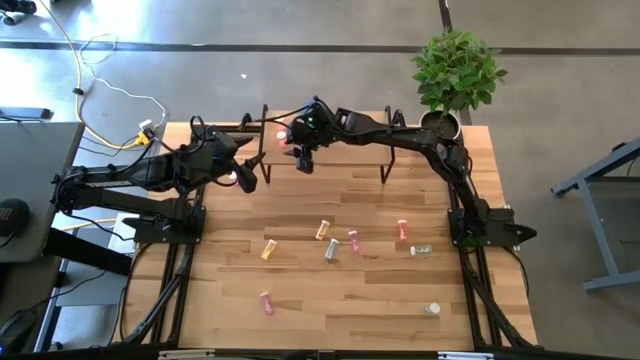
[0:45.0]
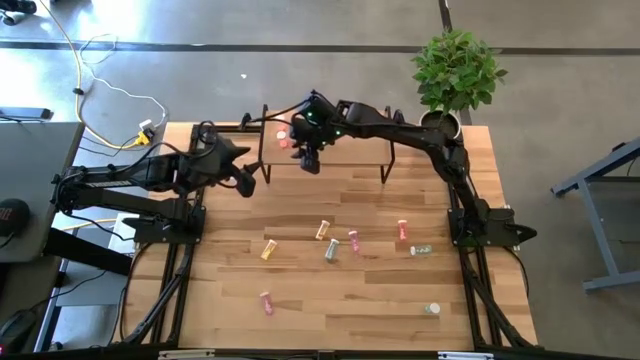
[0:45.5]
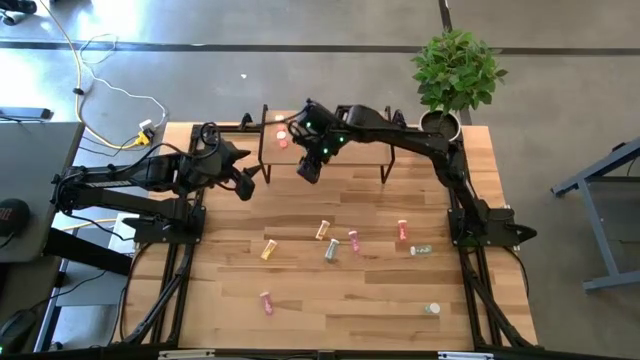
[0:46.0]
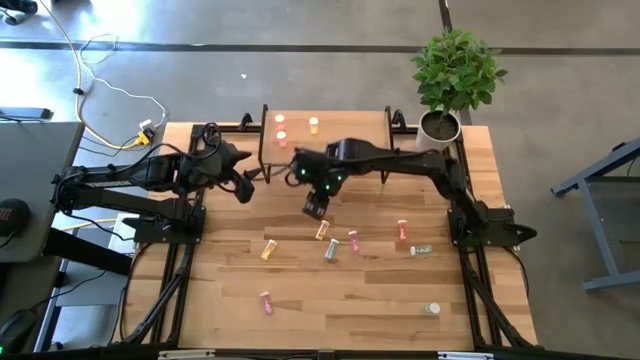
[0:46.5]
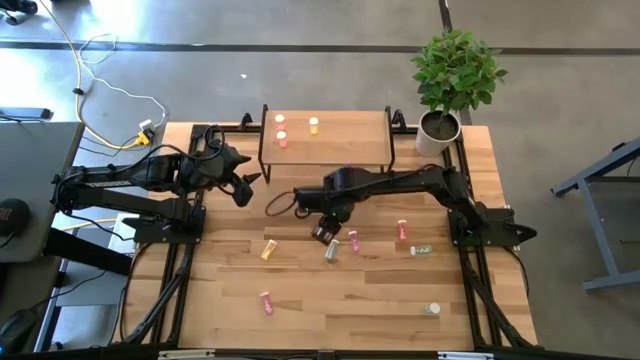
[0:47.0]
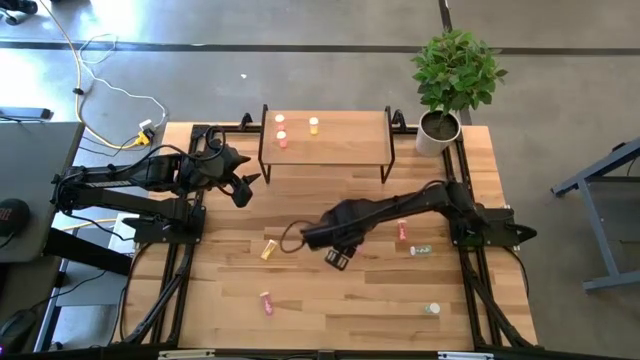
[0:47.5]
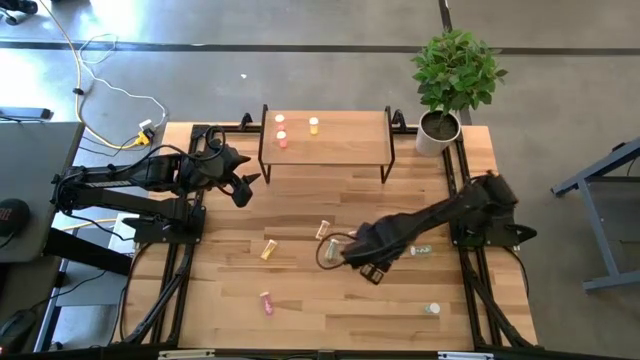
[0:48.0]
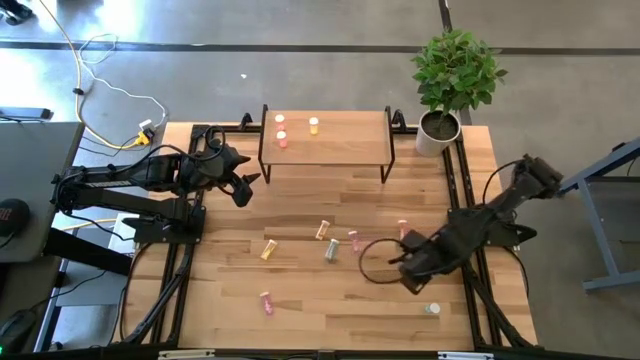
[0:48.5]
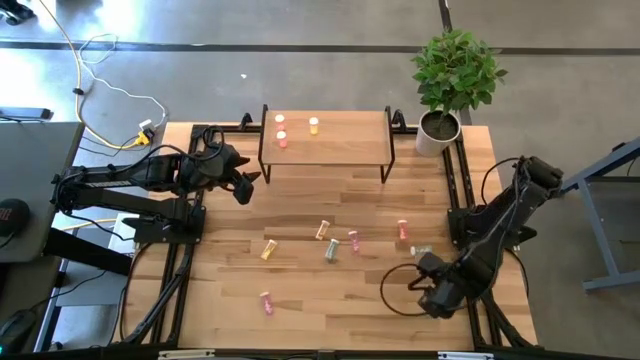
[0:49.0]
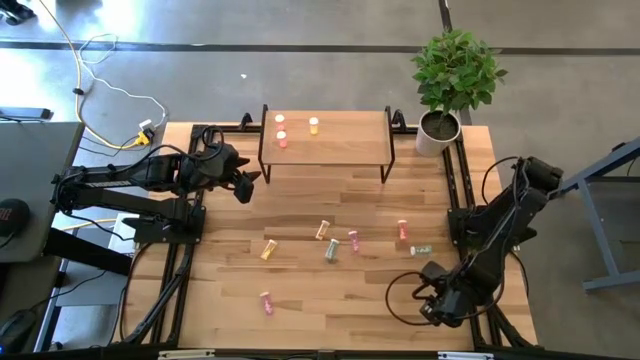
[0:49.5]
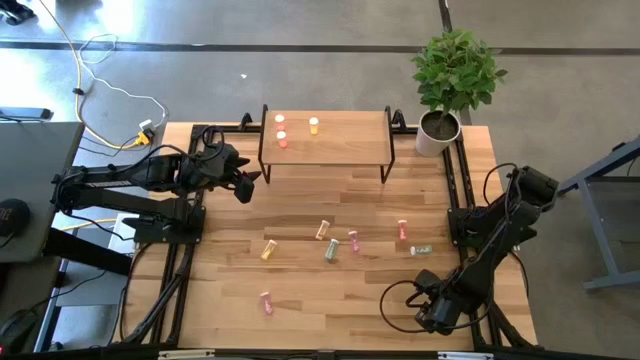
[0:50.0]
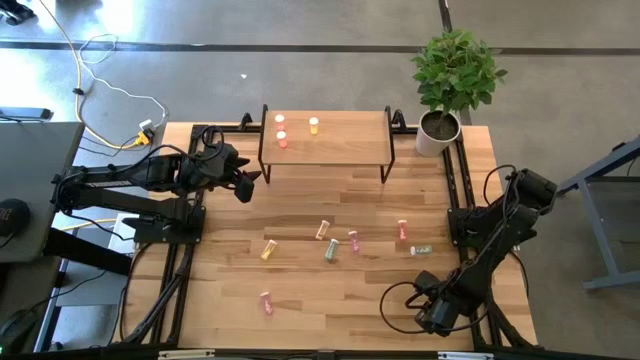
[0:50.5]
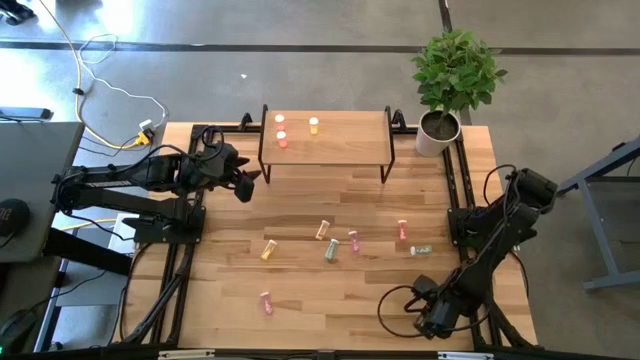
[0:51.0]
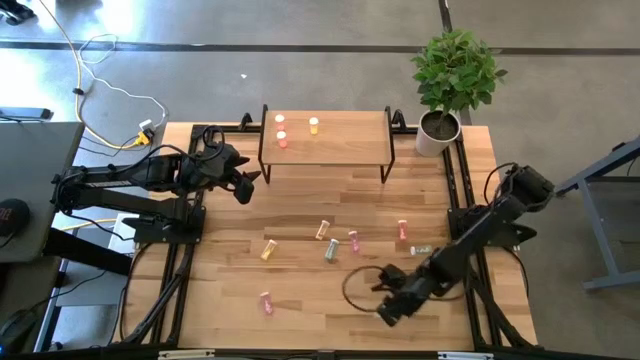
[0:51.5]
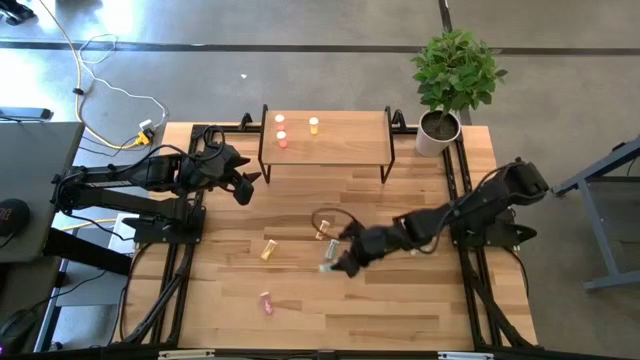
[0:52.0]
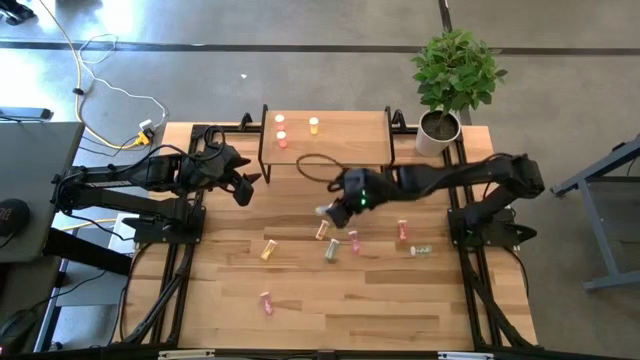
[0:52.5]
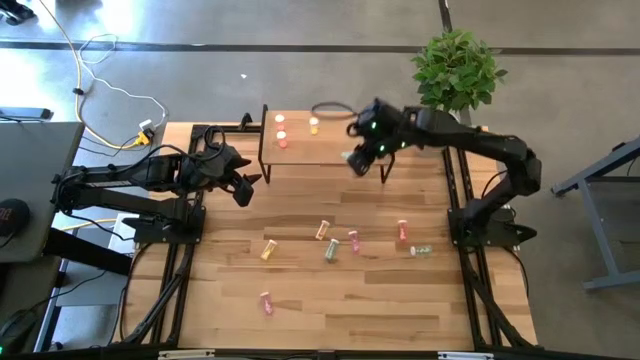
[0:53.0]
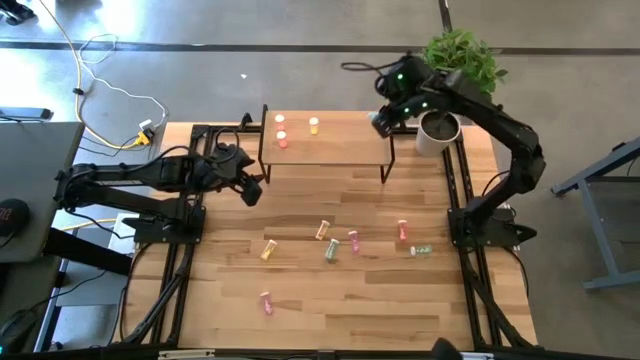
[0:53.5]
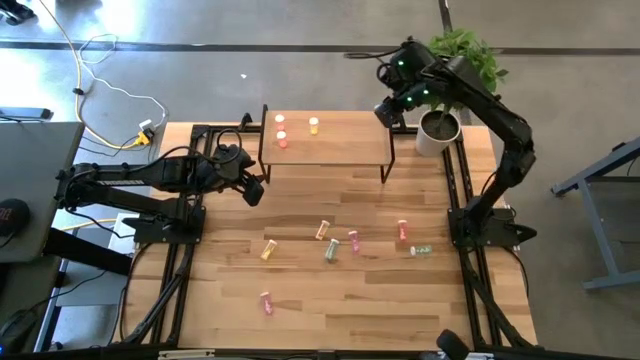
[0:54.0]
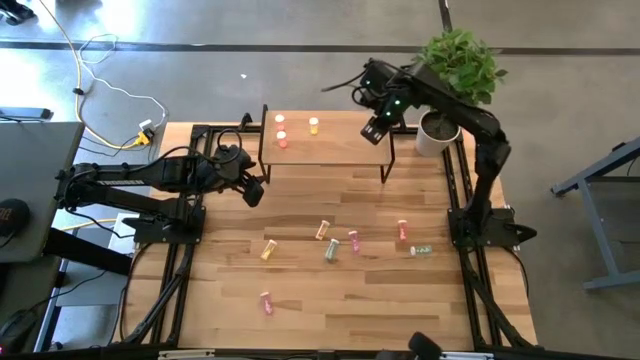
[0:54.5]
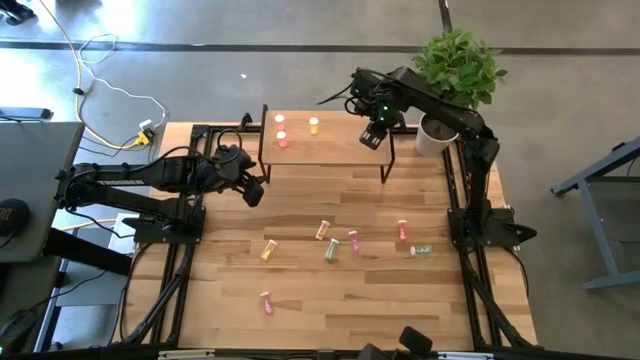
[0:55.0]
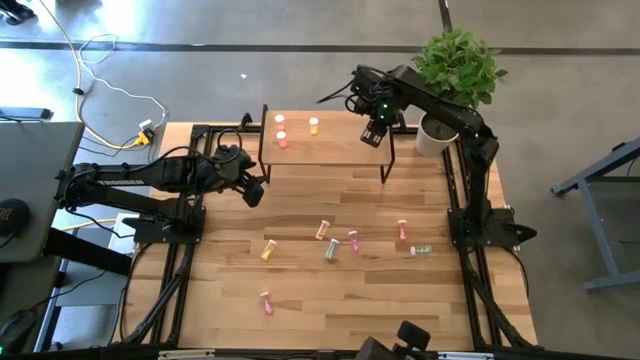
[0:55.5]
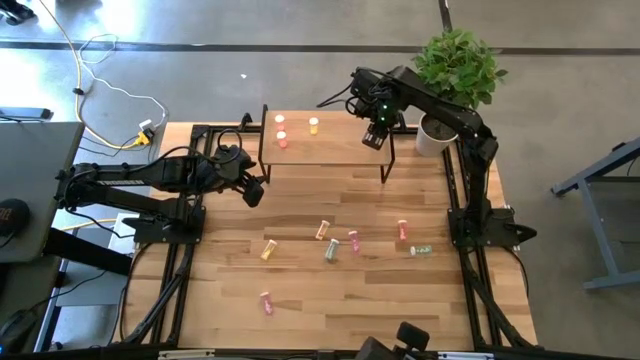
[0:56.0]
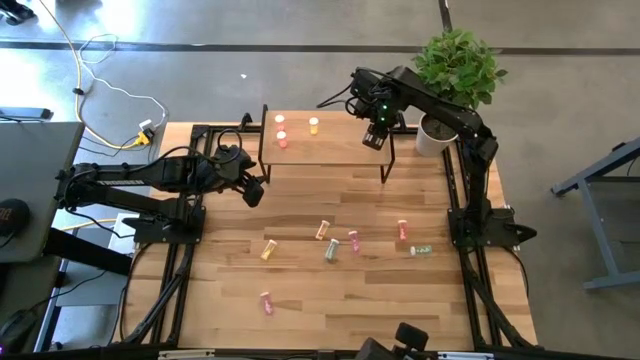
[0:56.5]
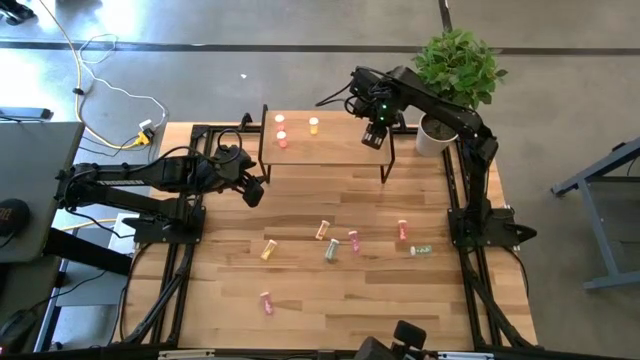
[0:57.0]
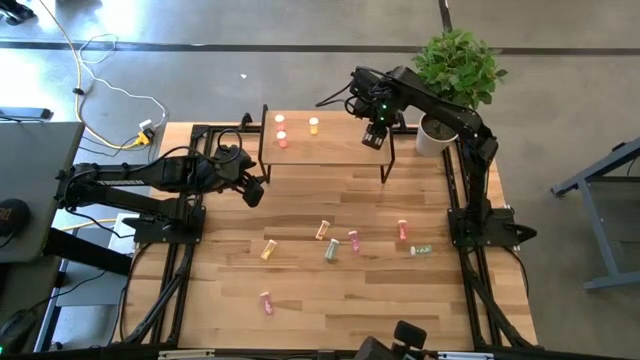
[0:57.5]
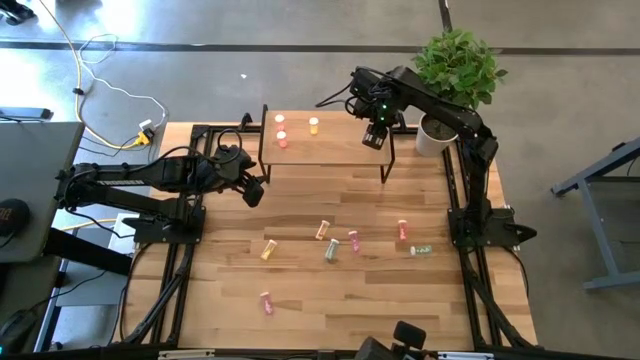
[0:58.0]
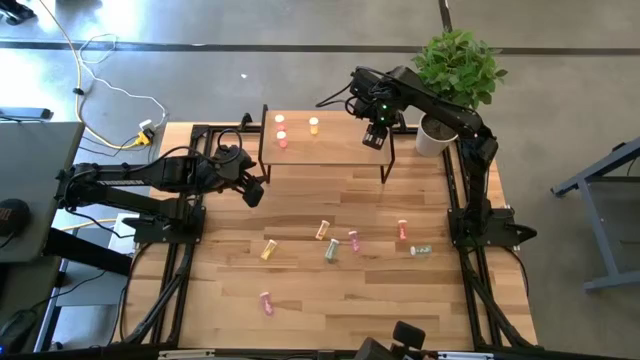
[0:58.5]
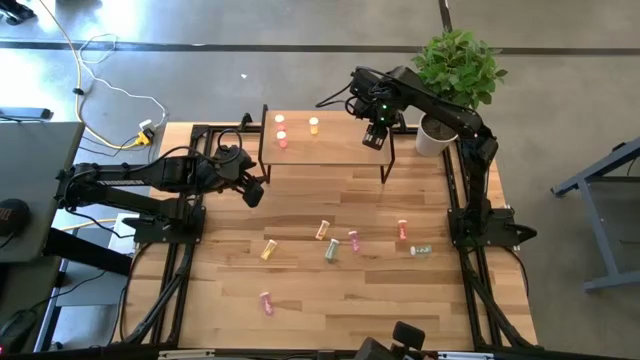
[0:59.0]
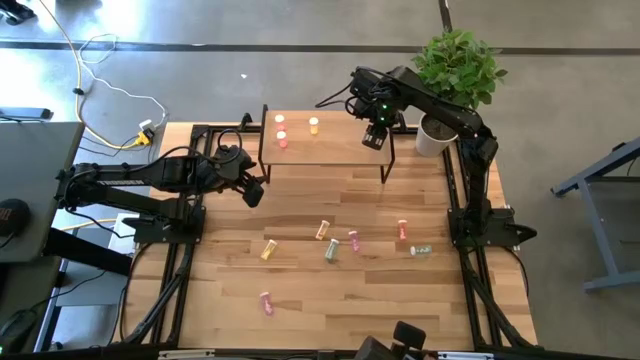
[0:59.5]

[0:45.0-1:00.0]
Task: Pick and place medicine bottles onto shelf by color
Put the bottom blue pill bottle on the shelf

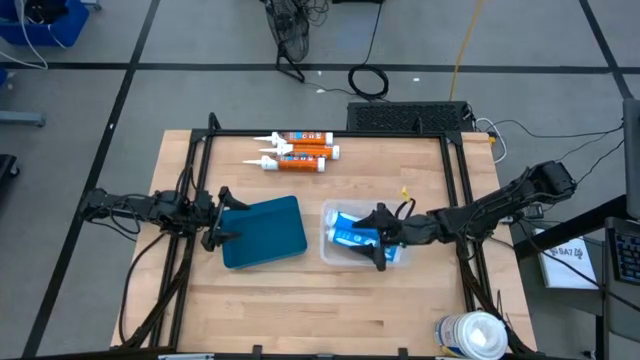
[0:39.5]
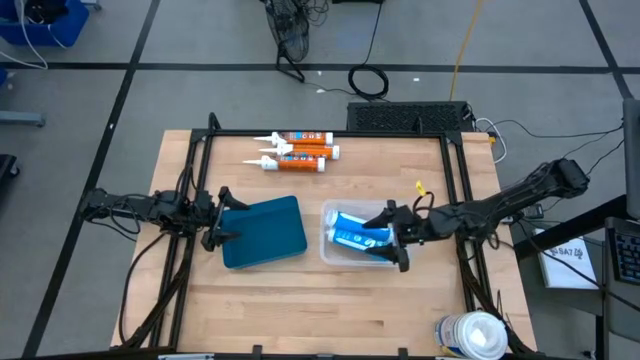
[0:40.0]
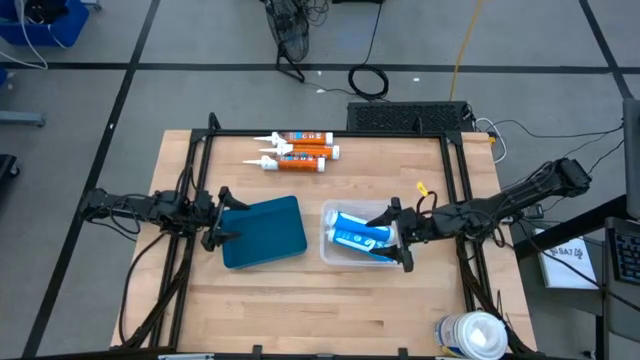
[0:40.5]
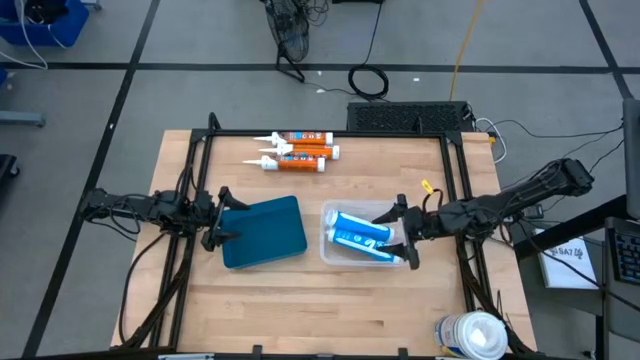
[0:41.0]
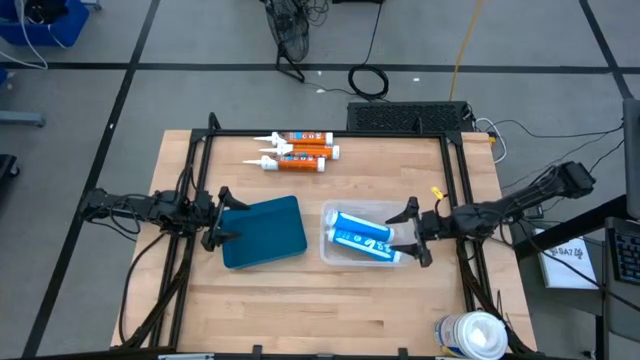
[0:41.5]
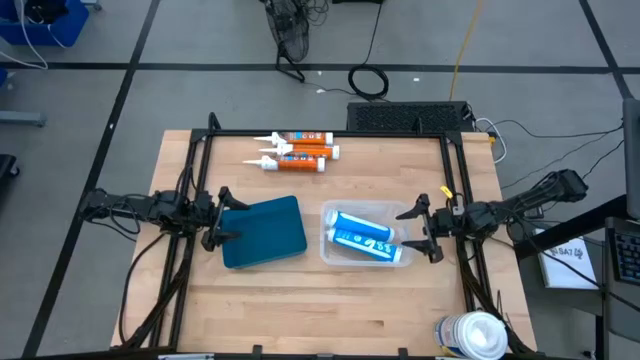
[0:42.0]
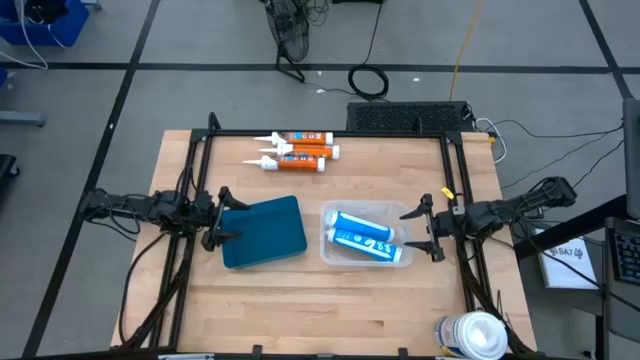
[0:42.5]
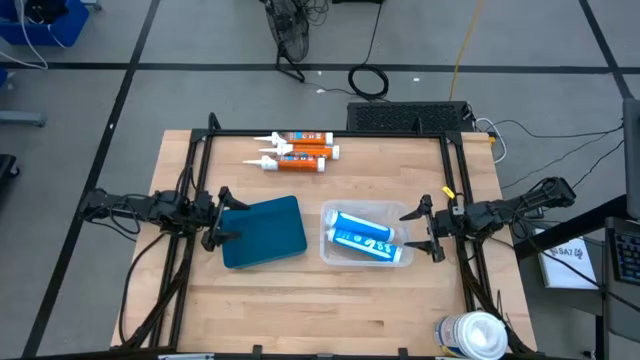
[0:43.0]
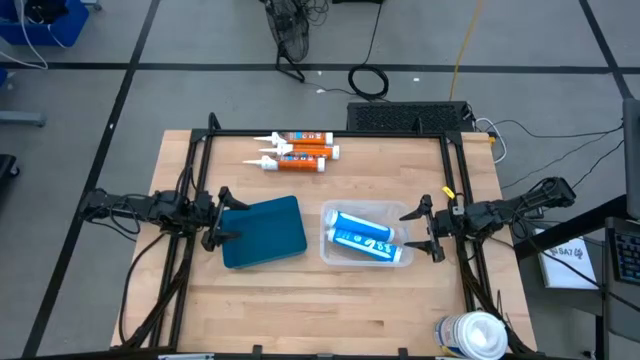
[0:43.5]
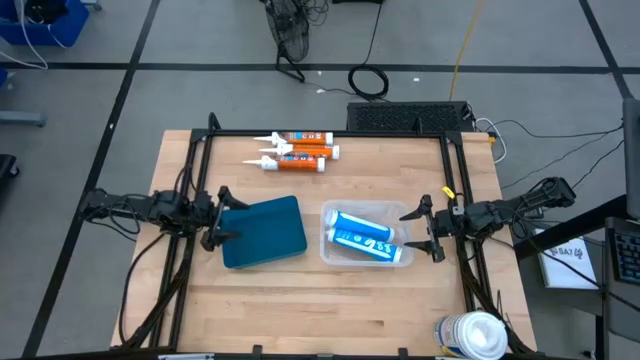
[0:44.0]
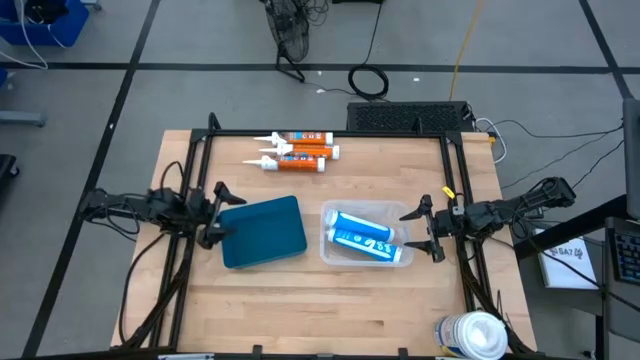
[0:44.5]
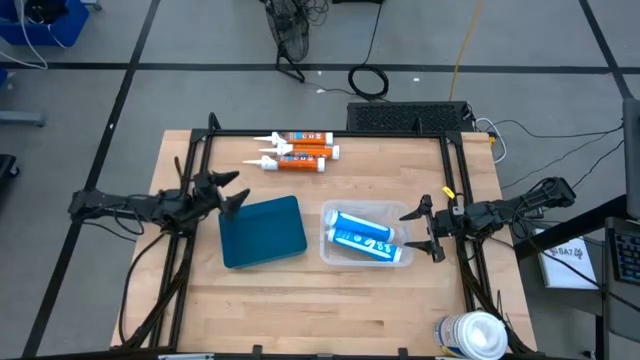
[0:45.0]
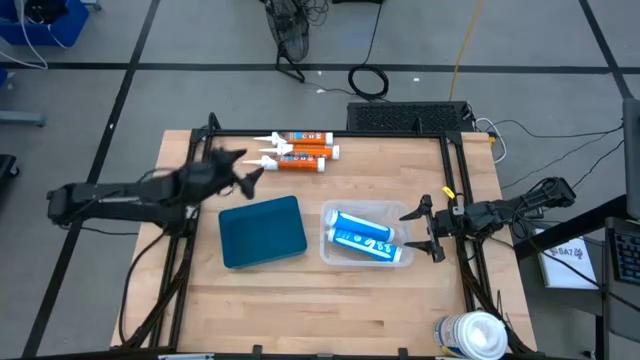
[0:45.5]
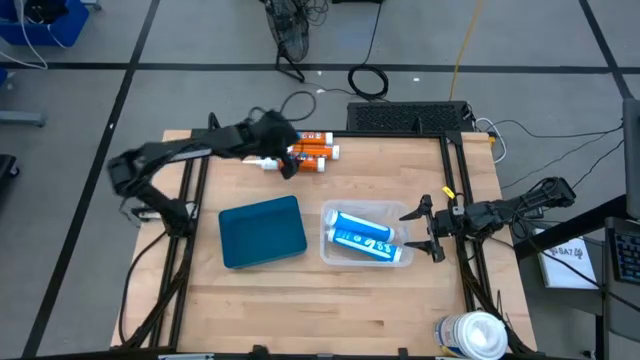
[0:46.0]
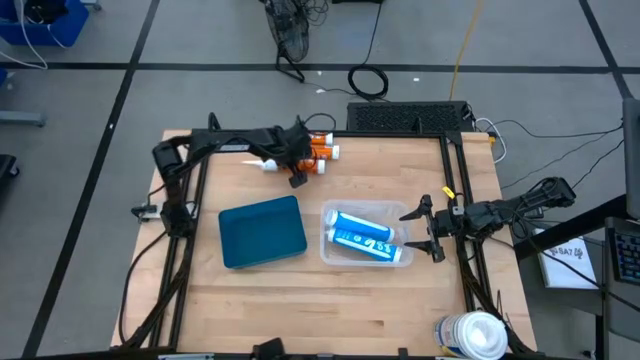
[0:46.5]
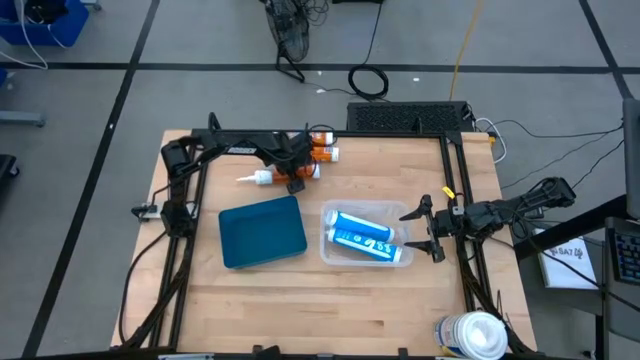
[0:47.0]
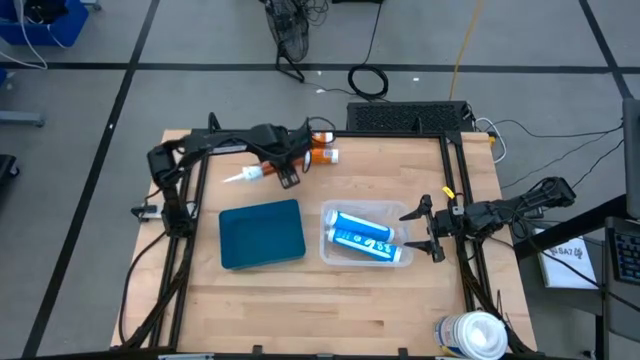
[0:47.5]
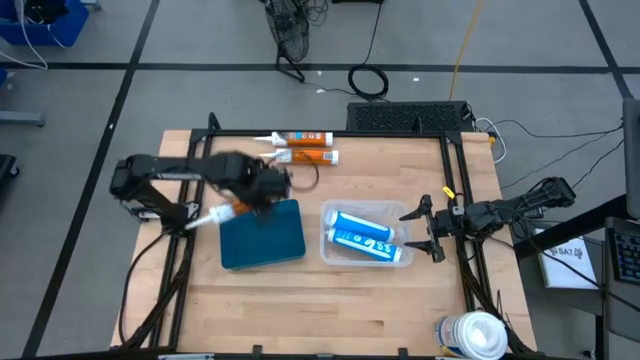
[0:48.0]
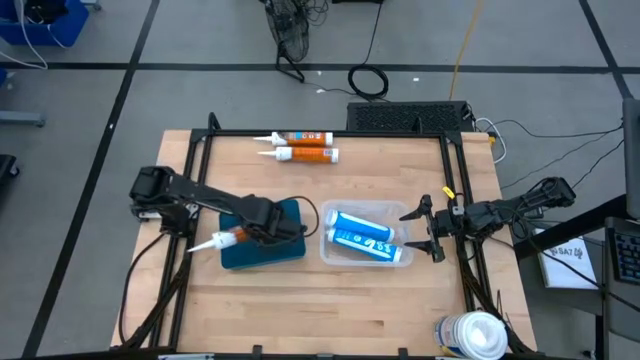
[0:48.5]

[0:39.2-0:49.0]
Task: Pick & place silicon tubes, Sealant and Lysol wipes
Put the bottom orange sealant bottle into the blue bin
